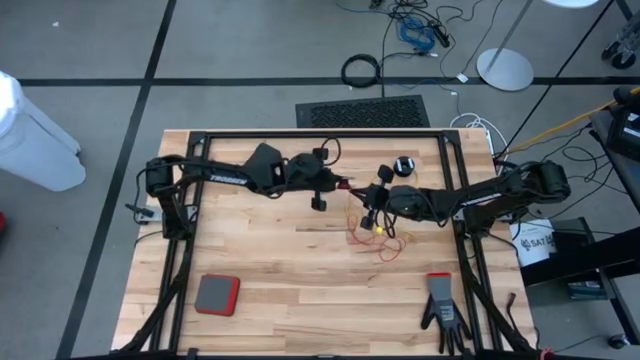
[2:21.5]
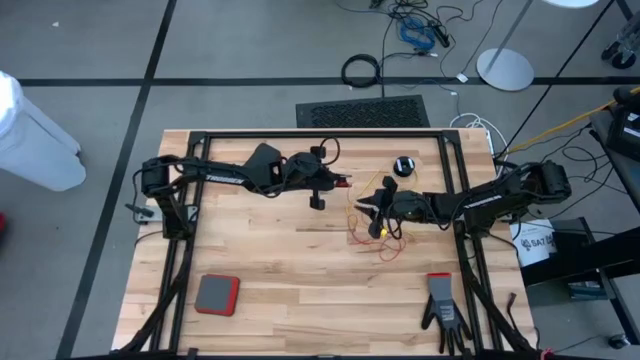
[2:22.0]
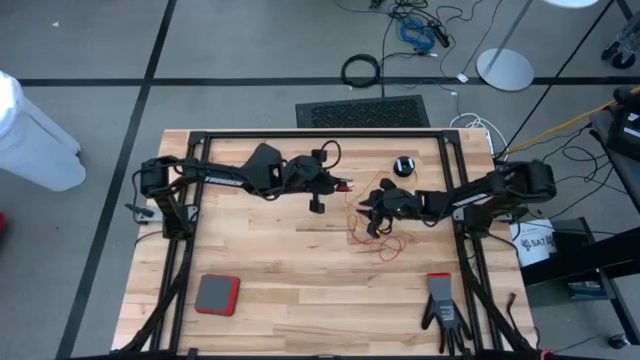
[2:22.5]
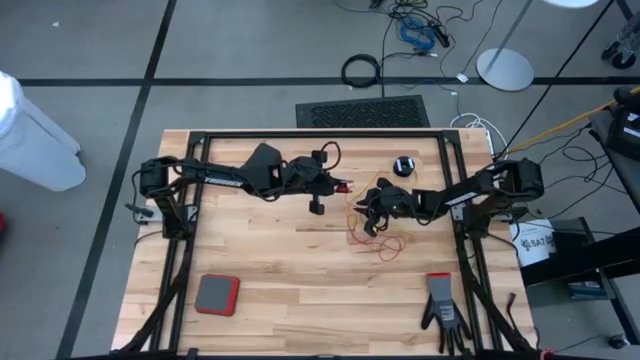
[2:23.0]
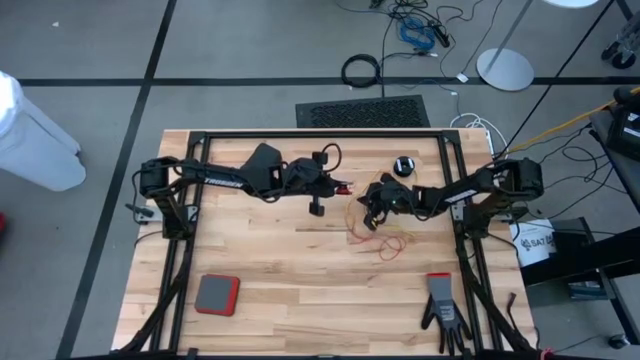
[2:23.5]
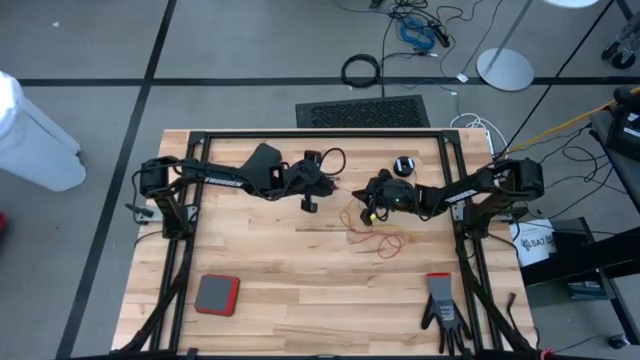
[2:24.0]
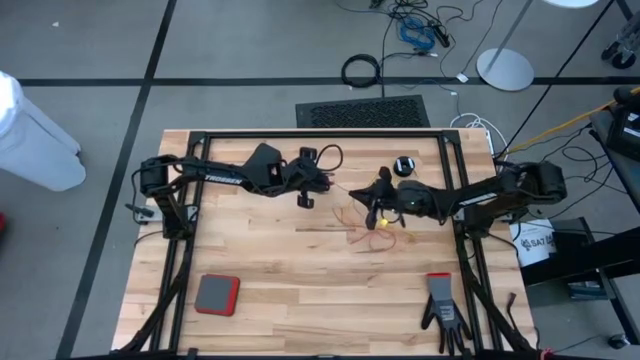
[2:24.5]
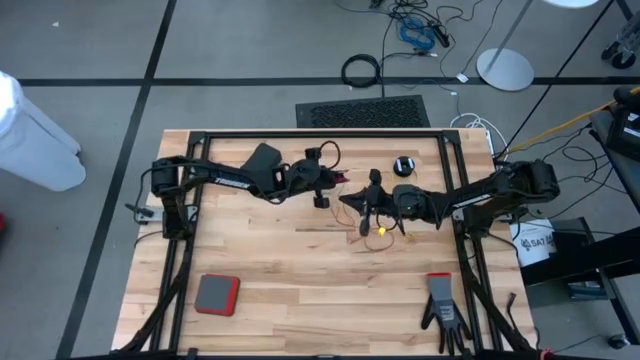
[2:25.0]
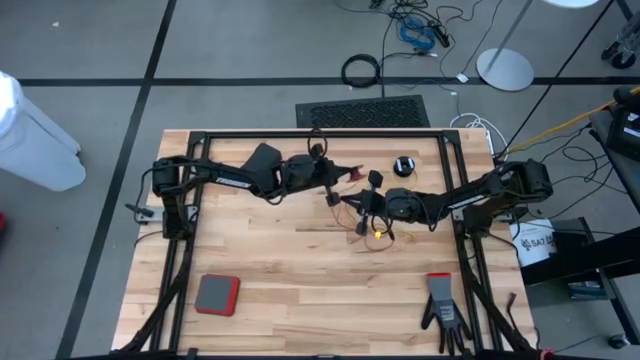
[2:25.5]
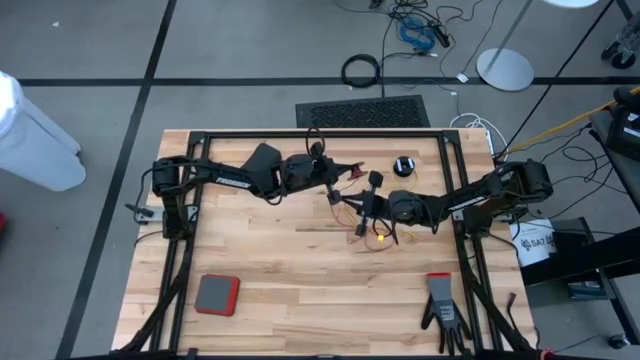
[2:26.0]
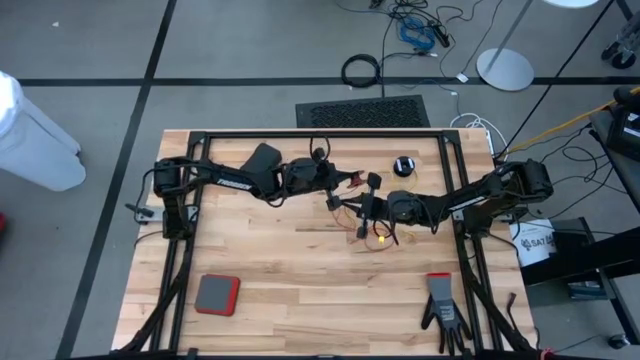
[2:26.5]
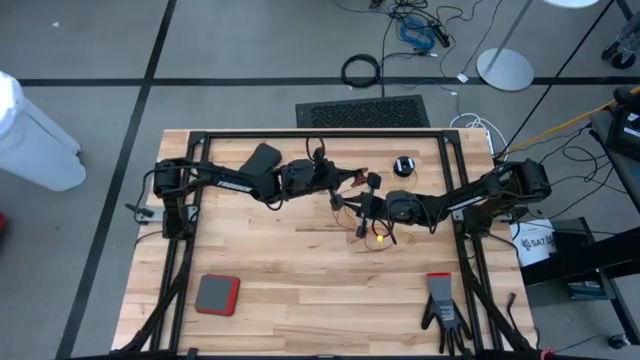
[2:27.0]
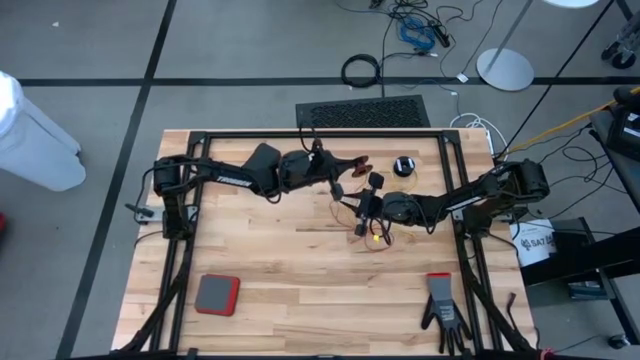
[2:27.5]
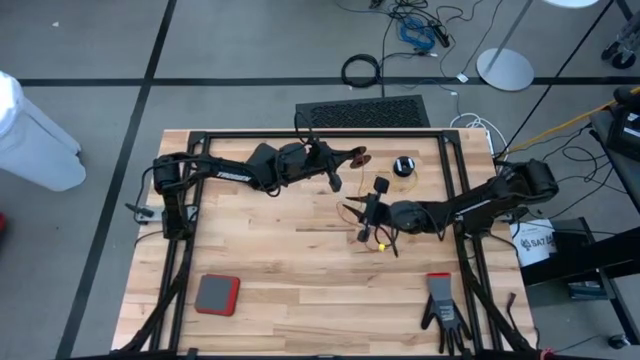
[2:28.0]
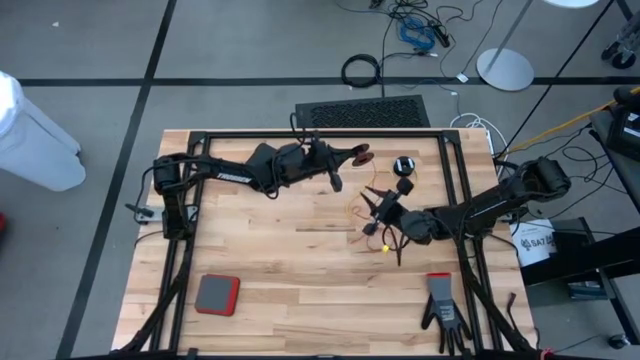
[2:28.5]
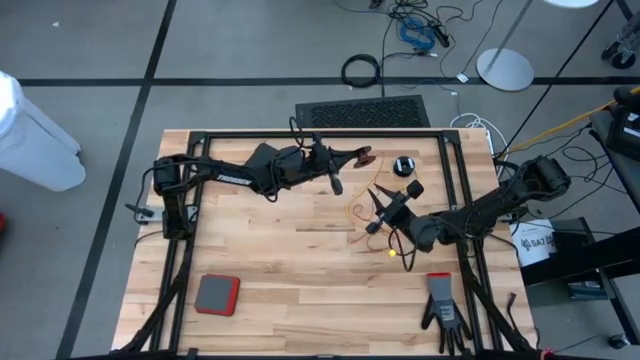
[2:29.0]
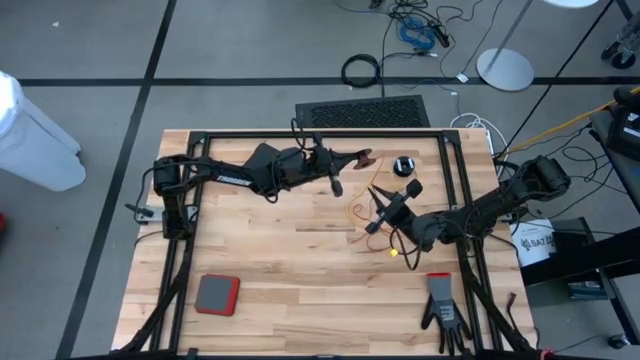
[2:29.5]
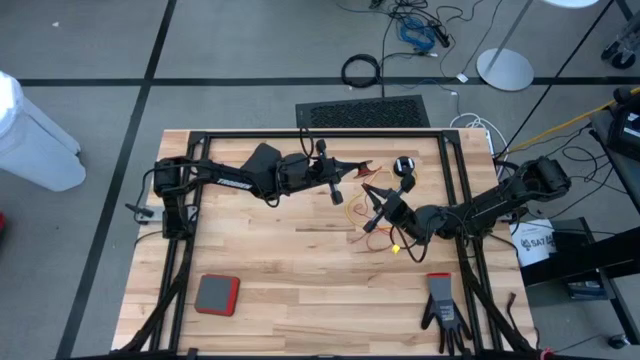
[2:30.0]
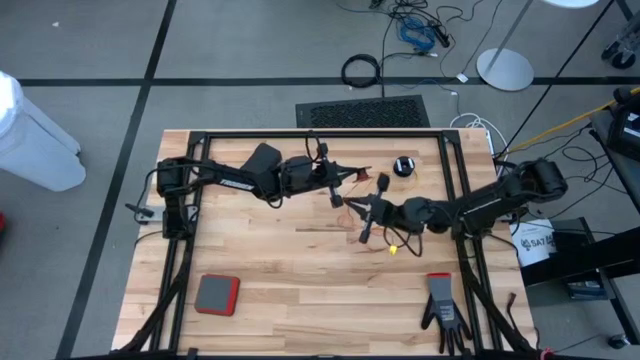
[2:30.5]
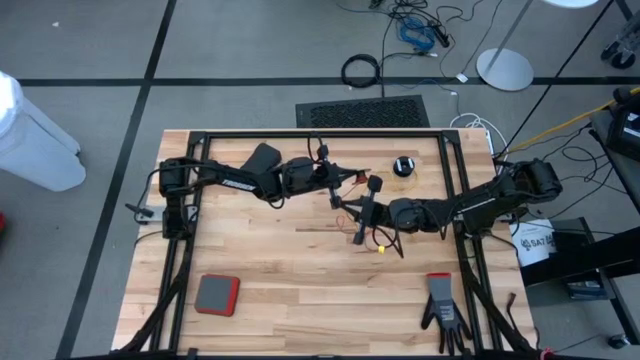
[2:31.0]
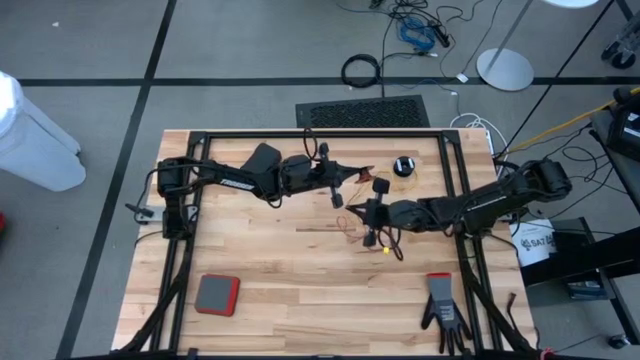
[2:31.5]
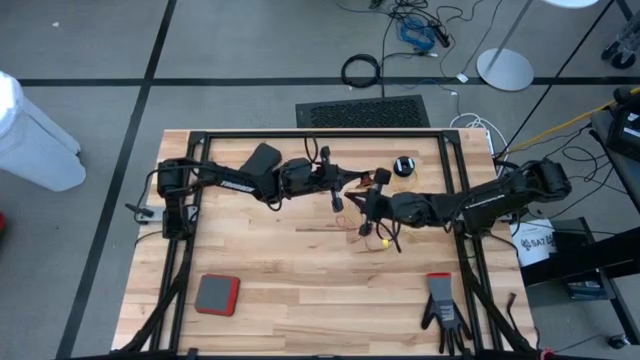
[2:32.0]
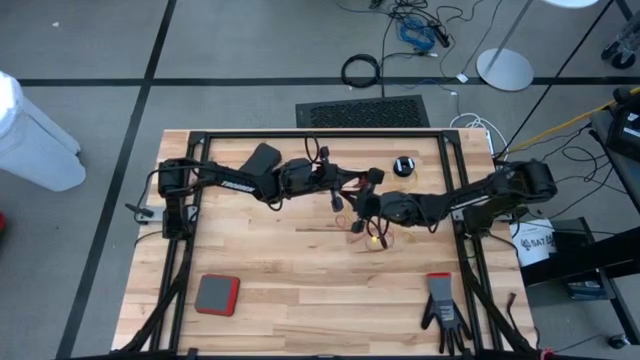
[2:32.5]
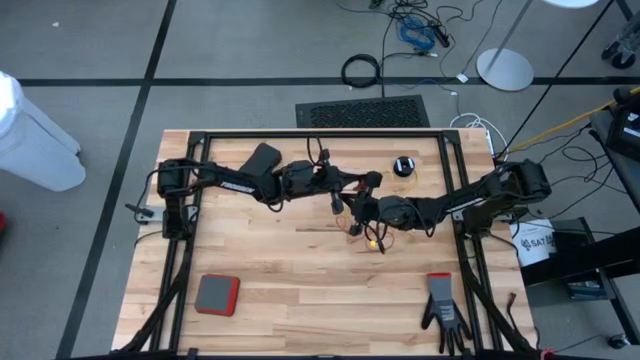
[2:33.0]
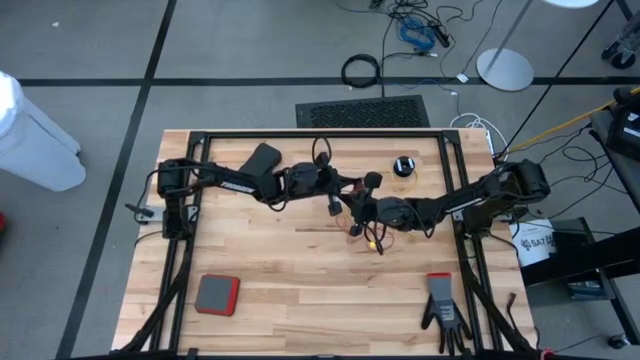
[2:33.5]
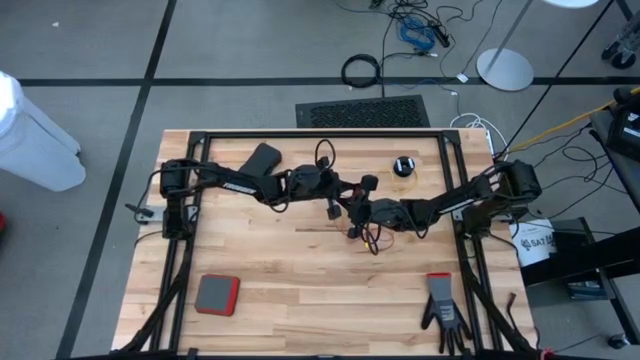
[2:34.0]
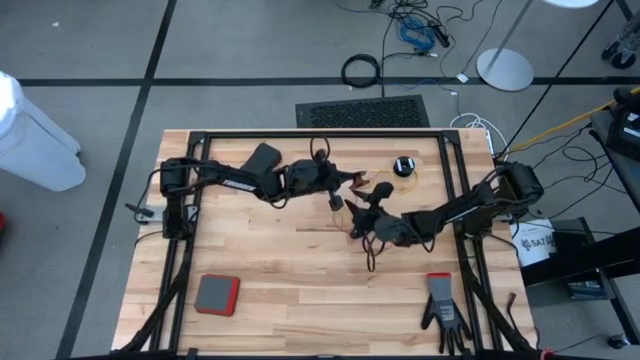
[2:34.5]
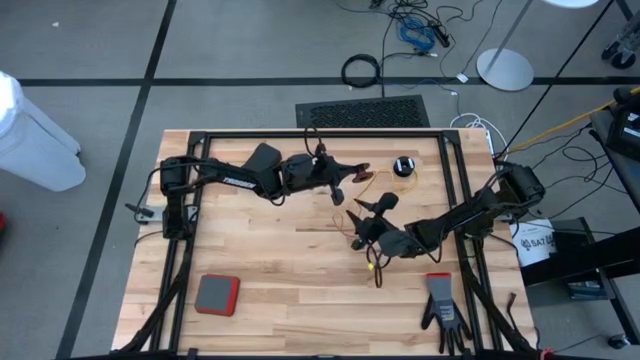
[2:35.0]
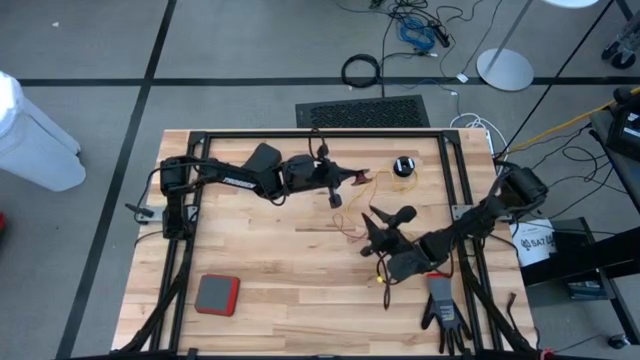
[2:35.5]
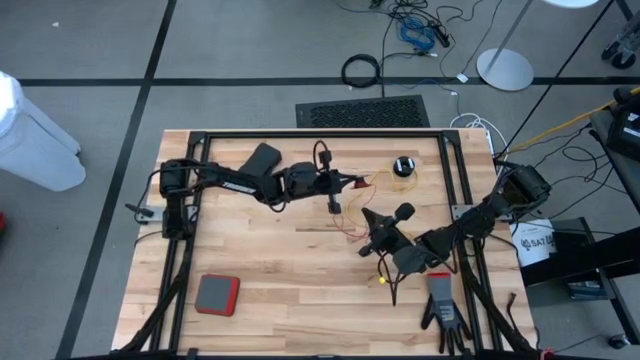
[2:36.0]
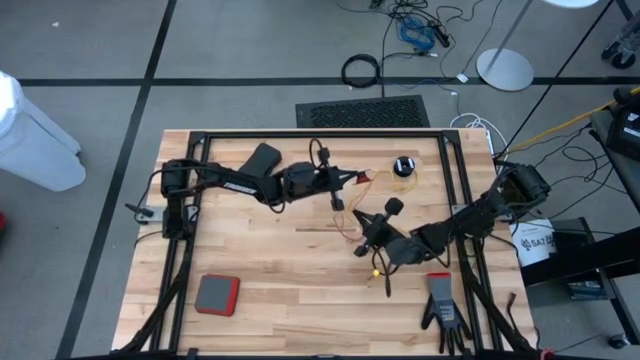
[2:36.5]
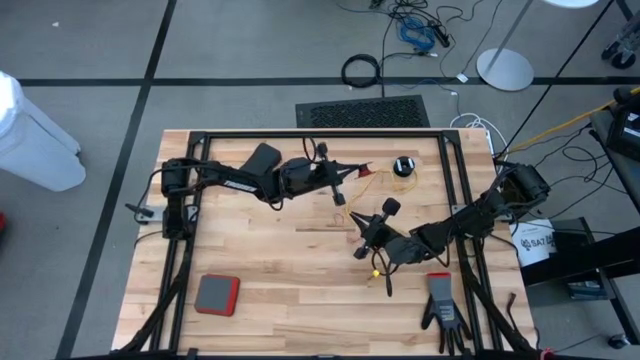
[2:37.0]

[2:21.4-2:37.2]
Task: Coil cords
Coil the red wire on the spool

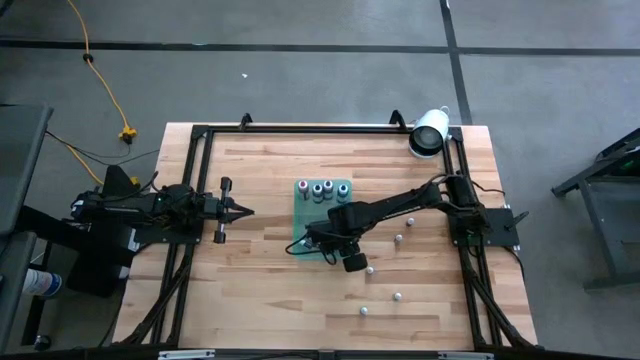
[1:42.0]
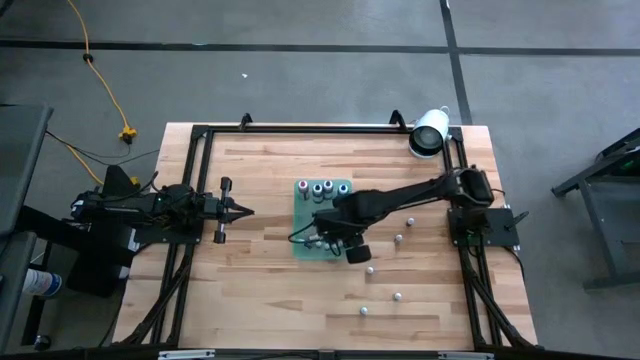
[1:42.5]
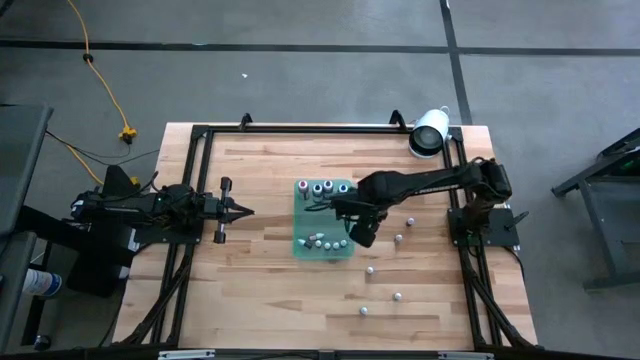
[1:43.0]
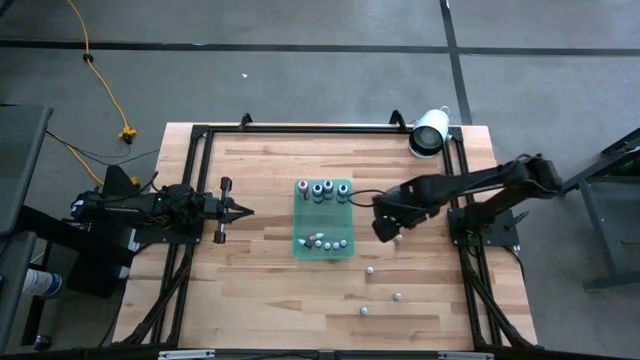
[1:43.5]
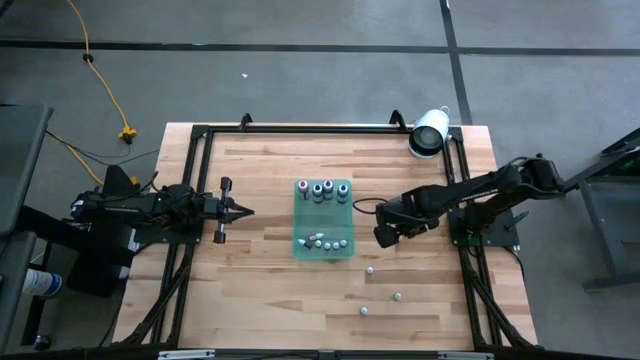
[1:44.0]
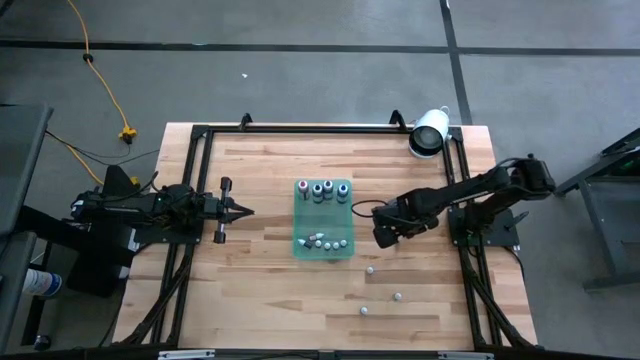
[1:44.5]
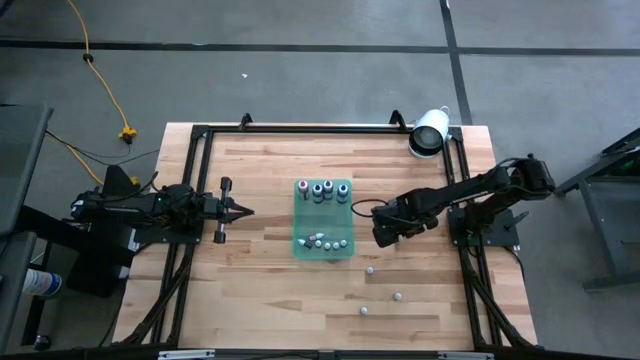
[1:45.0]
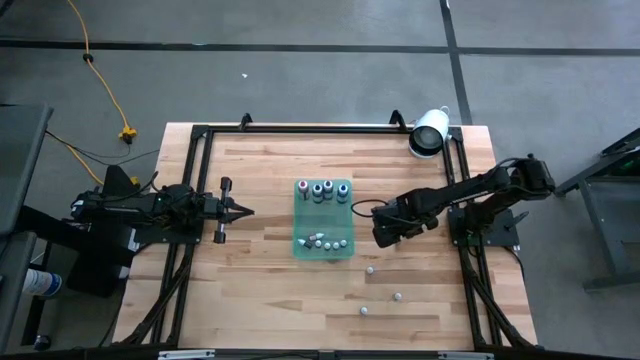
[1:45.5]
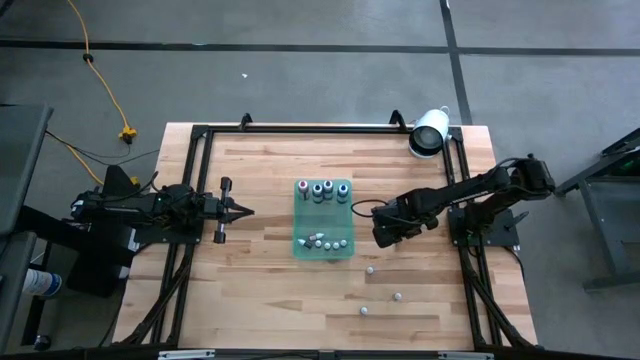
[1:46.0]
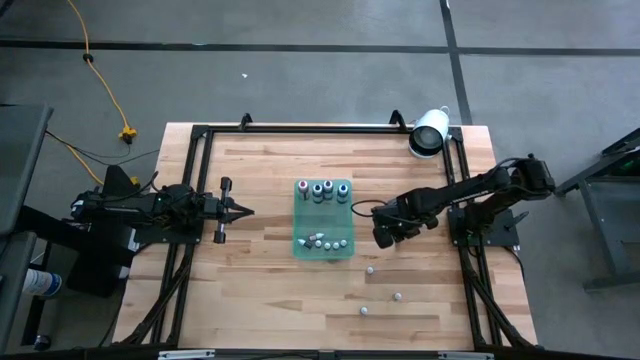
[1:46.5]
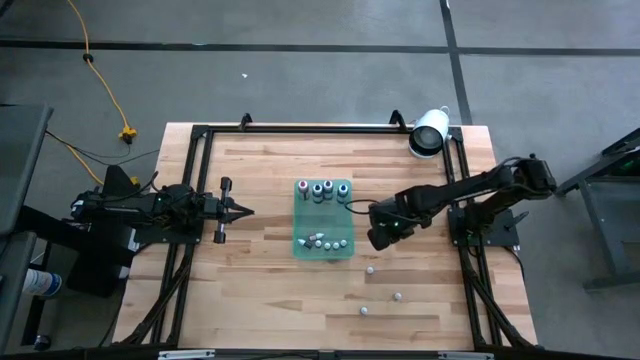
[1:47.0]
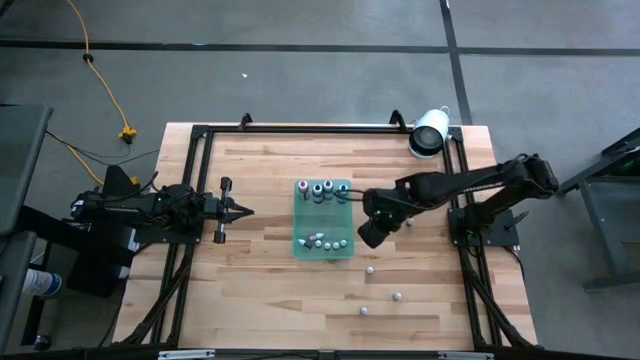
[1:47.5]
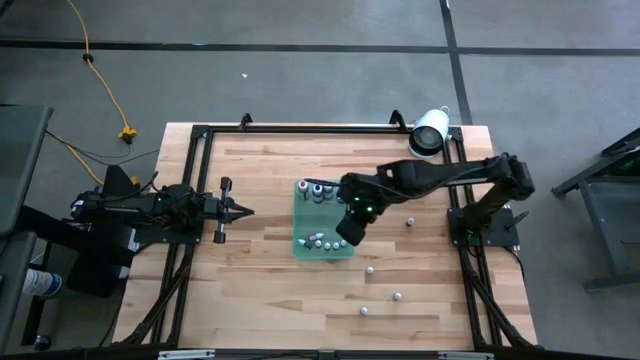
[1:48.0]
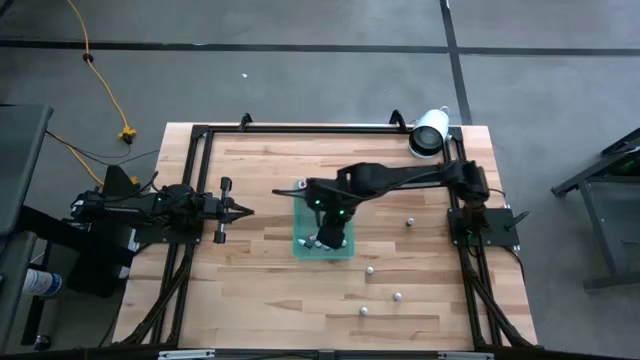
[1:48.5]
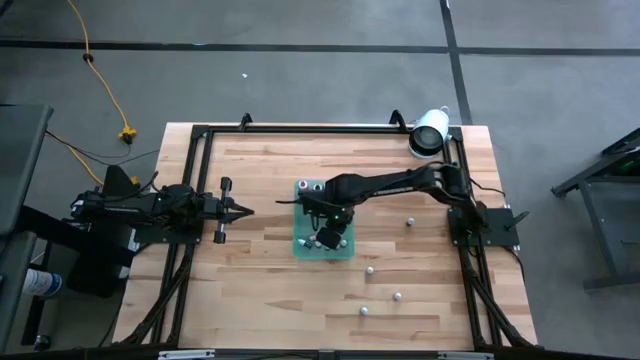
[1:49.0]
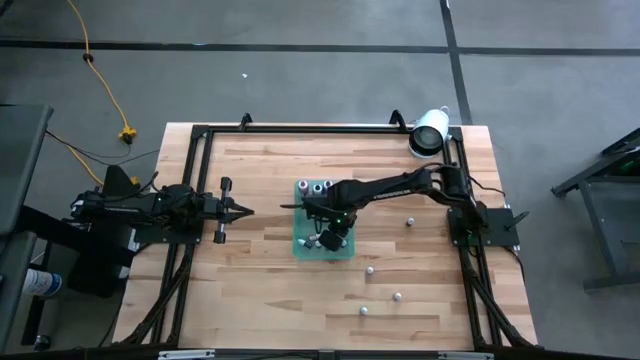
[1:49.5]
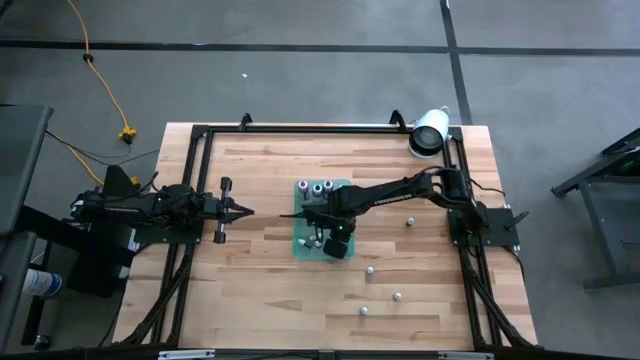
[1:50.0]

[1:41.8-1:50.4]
Task: Pick & Place food coloring
Put the small violet food coloring bottle into the green bin
